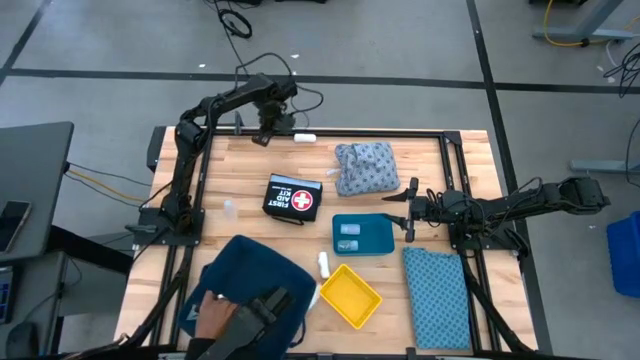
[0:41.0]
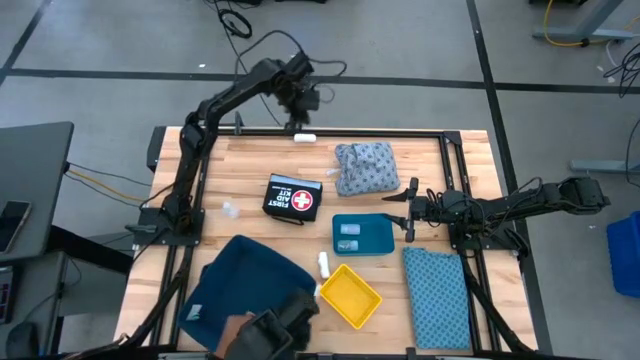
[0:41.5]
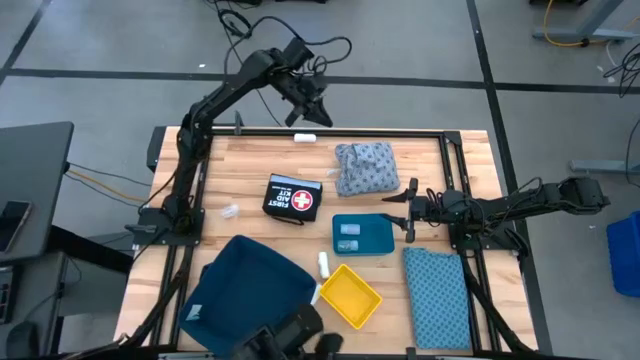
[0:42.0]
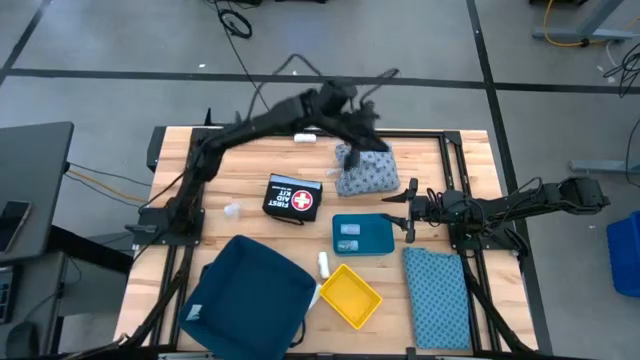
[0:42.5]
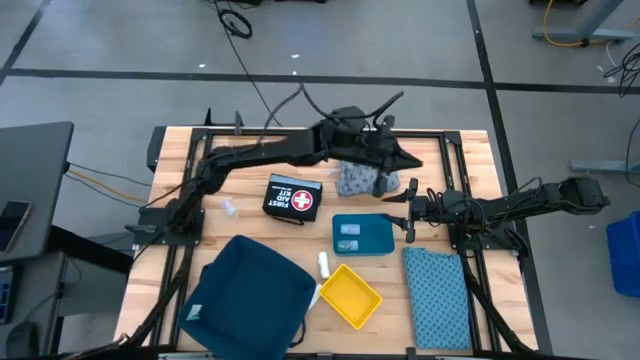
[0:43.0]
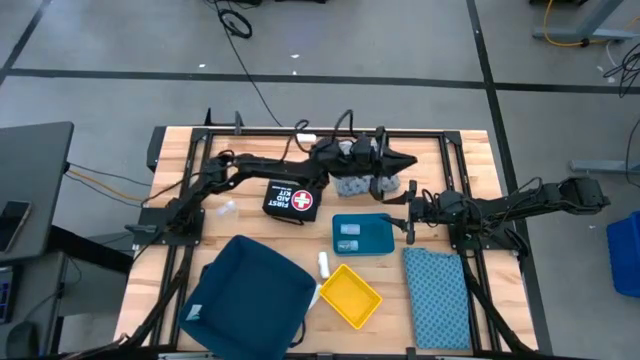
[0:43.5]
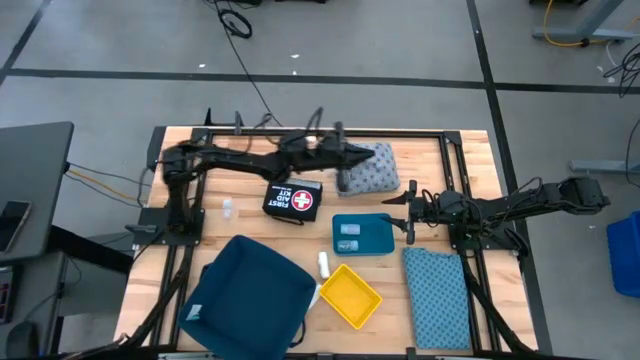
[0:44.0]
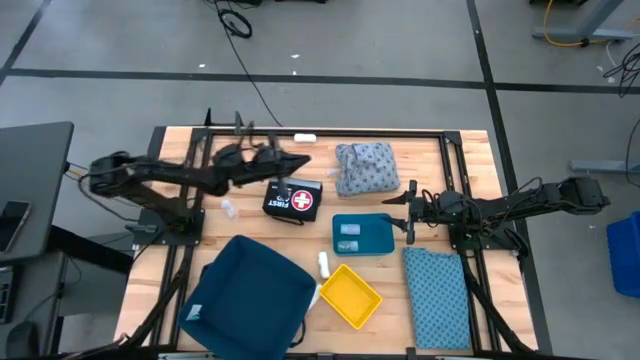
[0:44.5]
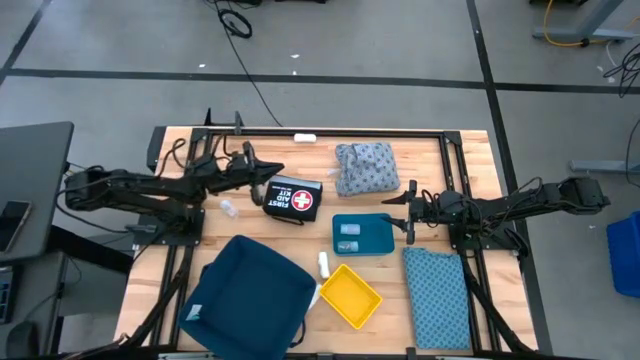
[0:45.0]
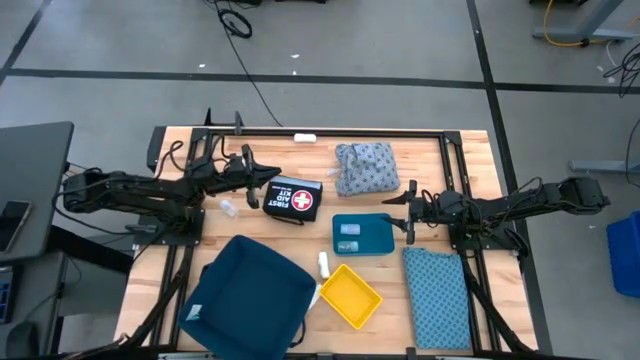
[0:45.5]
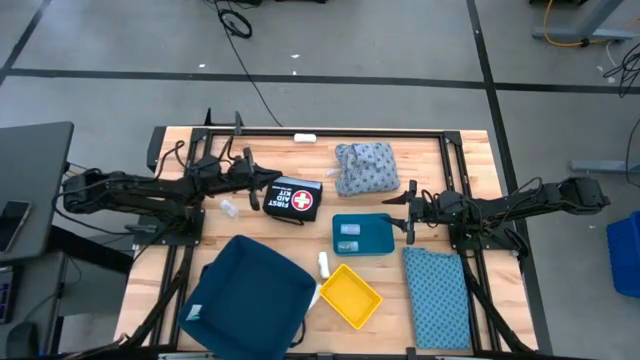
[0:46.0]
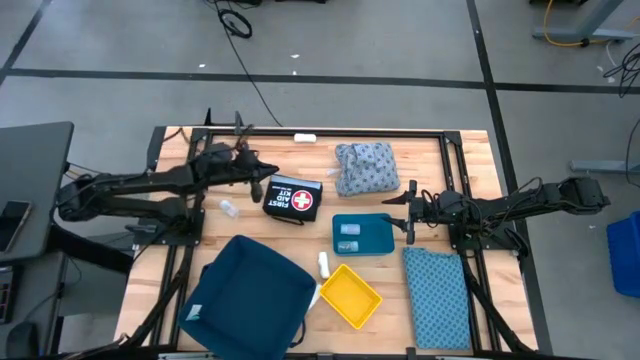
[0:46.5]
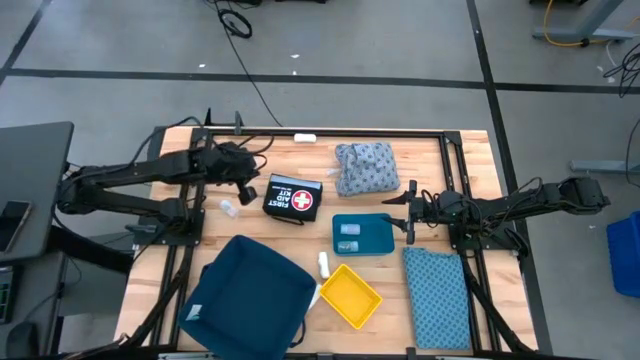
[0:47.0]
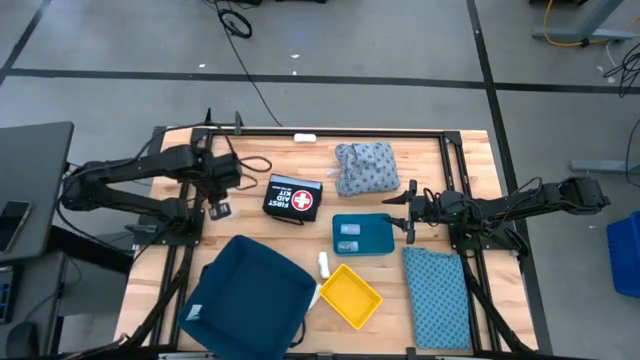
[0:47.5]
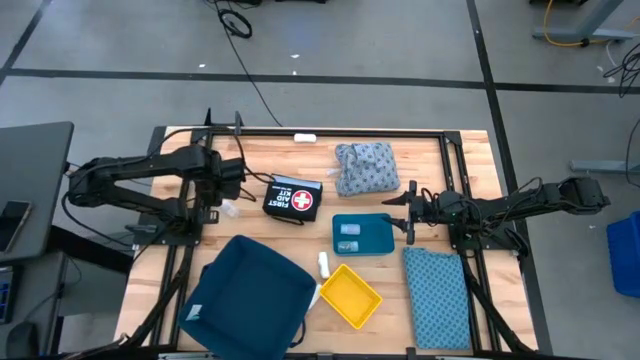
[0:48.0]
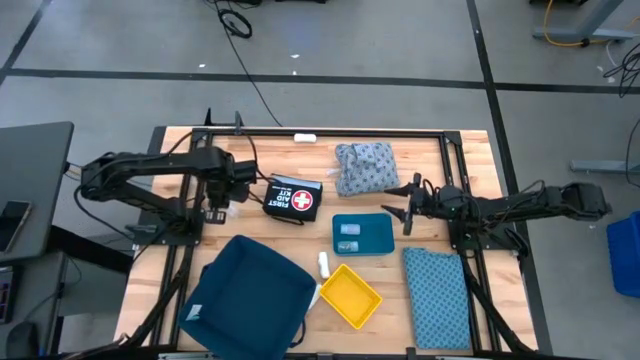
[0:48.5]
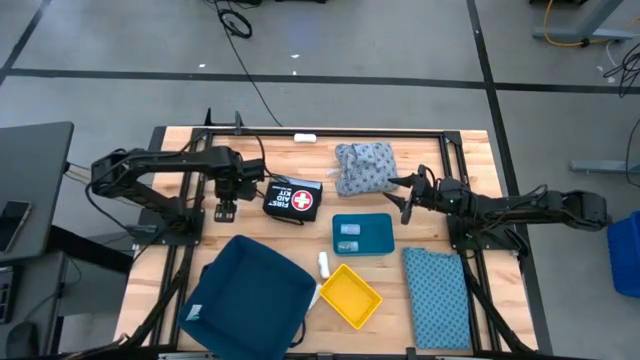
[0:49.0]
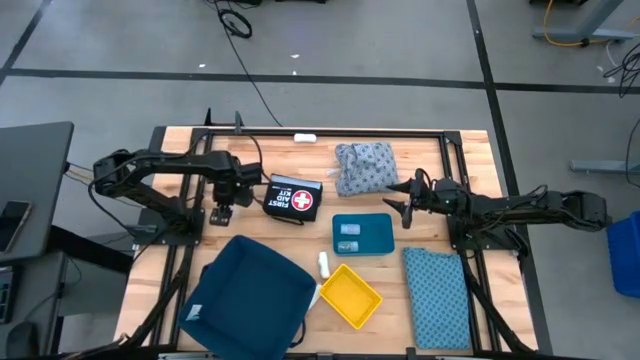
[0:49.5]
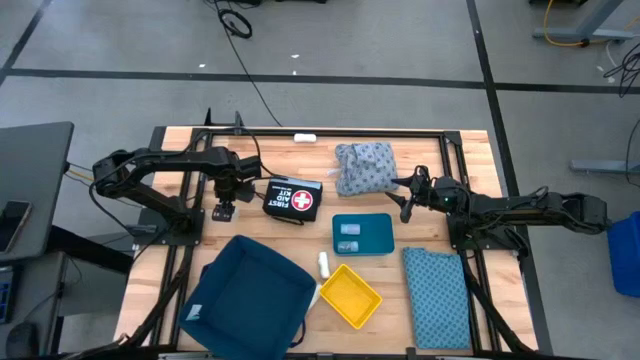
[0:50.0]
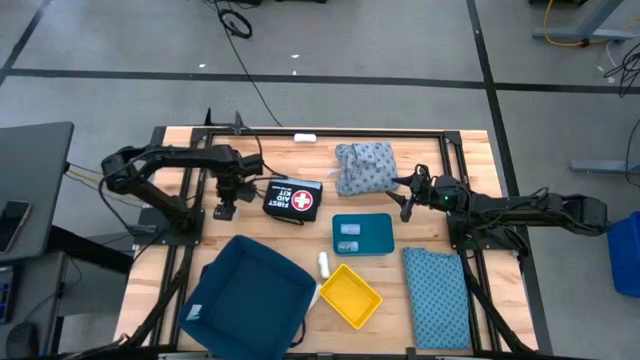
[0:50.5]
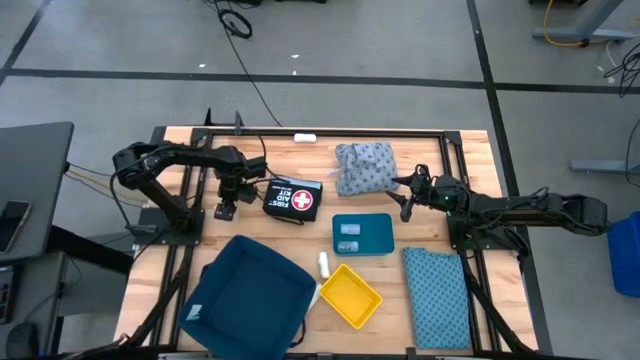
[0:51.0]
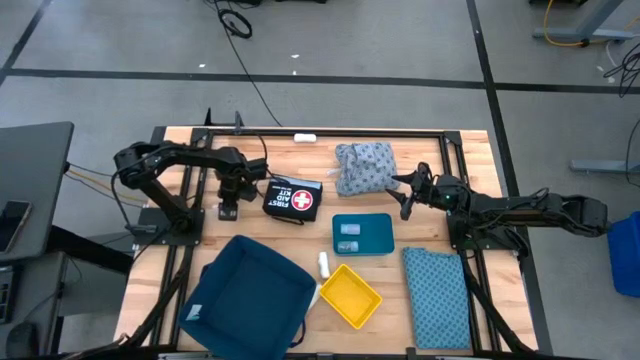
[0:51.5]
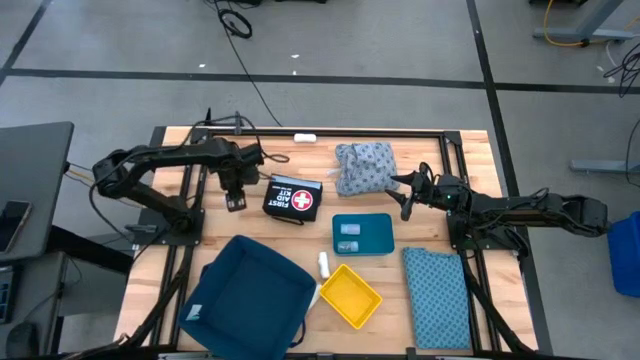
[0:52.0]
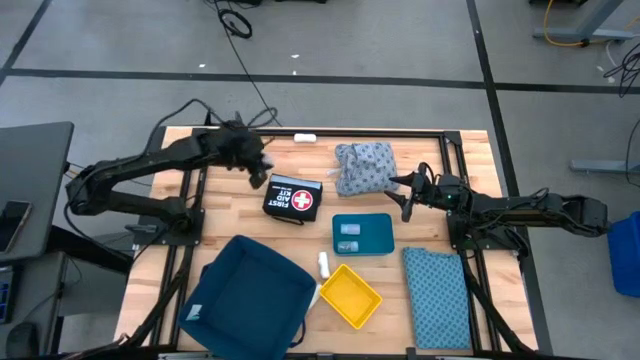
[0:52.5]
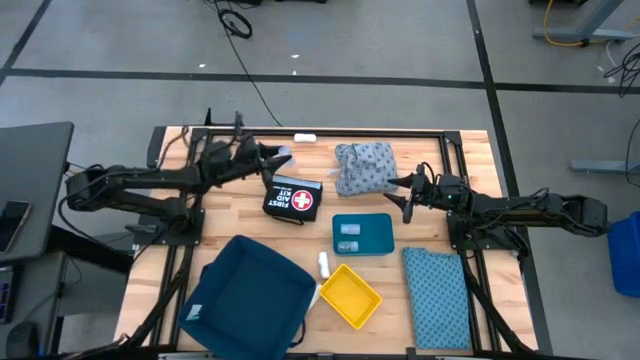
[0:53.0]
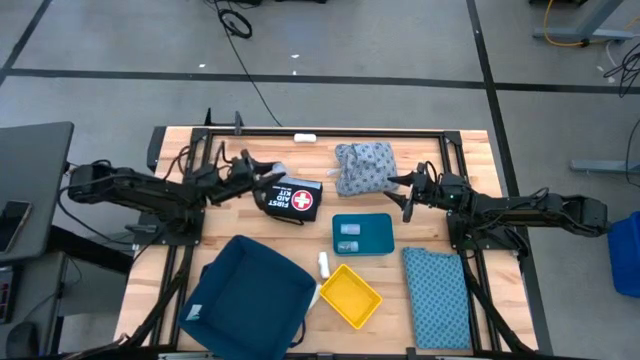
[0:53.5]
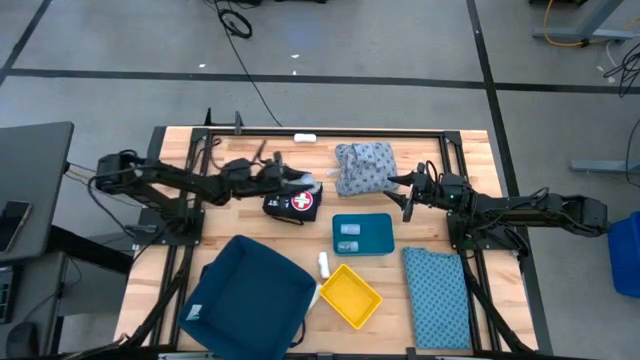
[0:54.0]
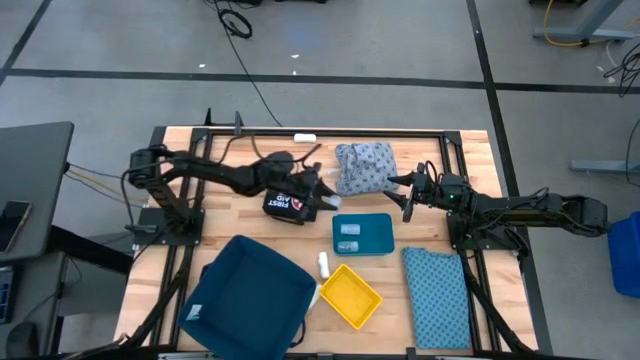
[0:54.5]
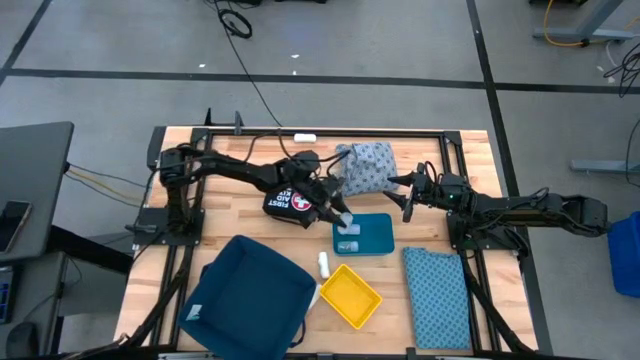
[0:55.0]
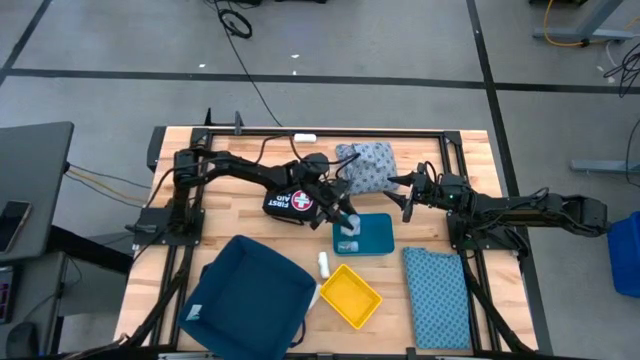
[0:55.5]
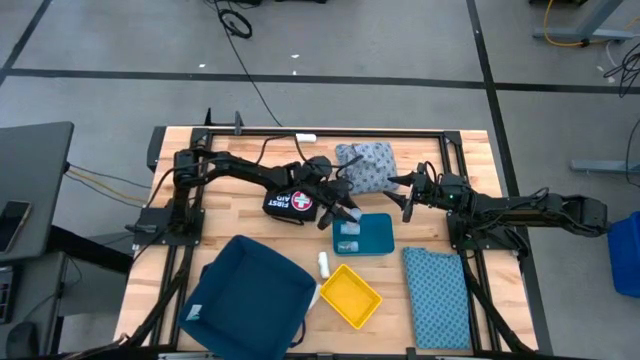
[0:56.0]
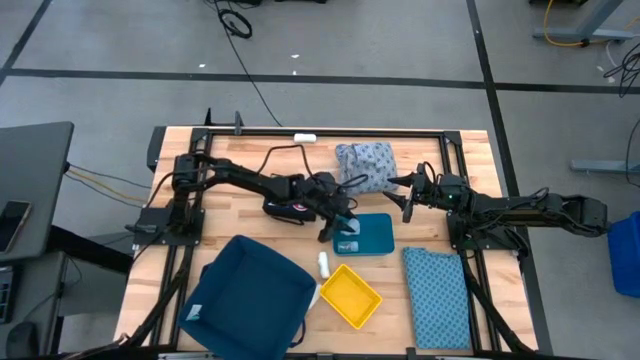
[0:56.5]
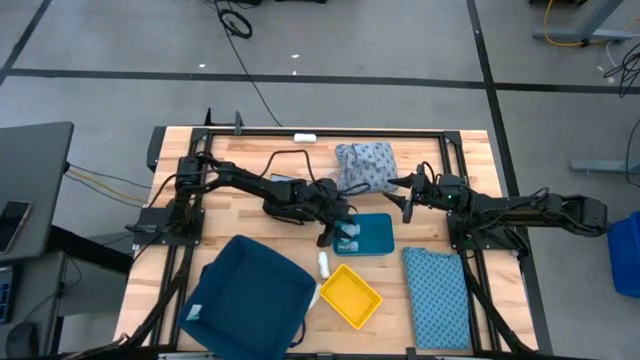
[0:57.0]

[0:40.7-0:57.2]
Task: Pick & place medical supplies in basket/bin
Put the pill bottle into the blue bin
